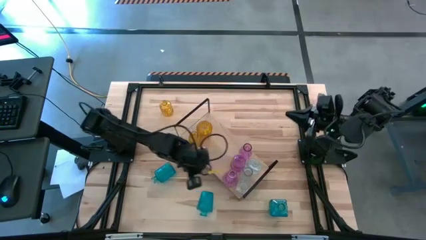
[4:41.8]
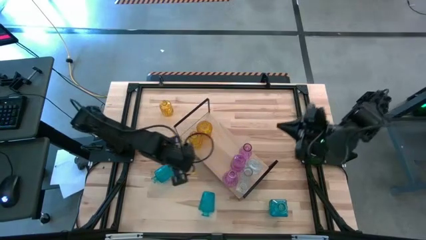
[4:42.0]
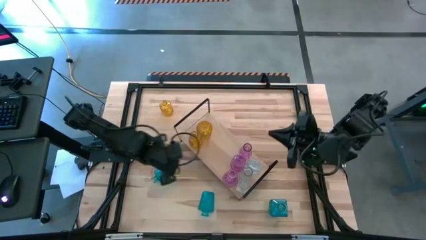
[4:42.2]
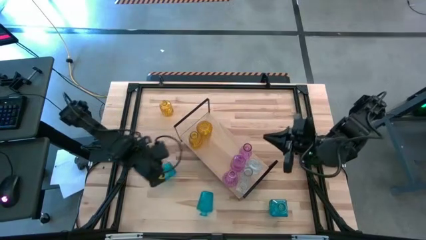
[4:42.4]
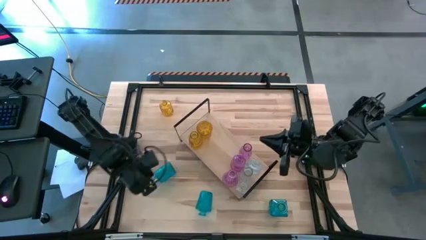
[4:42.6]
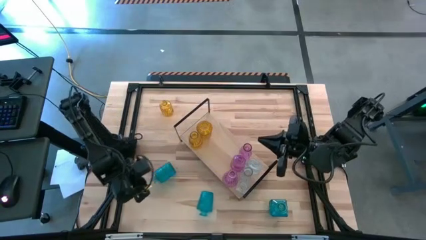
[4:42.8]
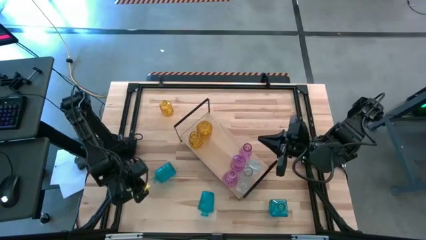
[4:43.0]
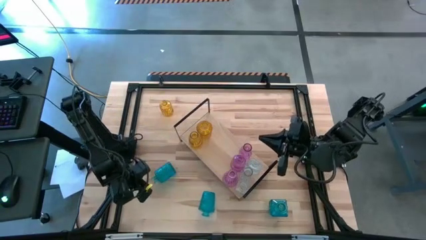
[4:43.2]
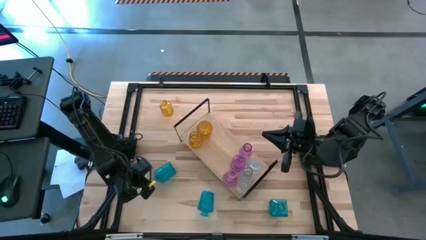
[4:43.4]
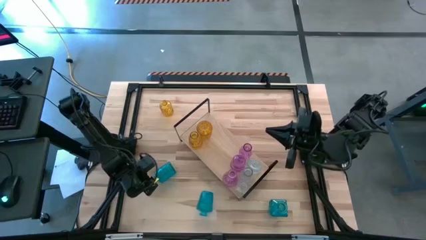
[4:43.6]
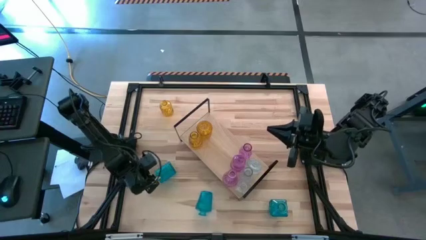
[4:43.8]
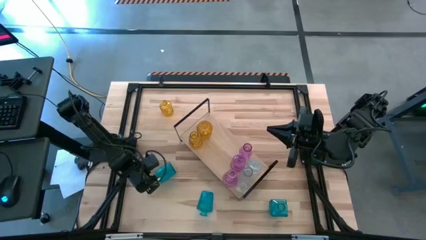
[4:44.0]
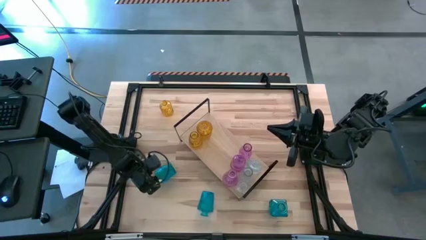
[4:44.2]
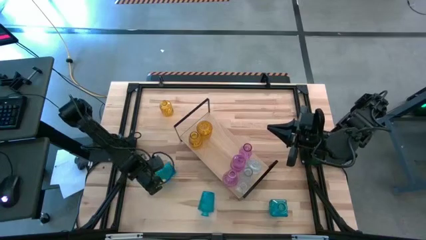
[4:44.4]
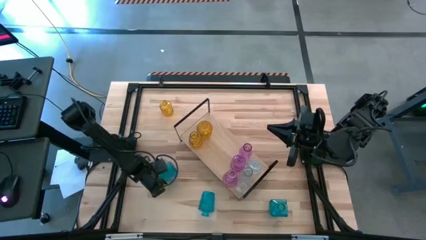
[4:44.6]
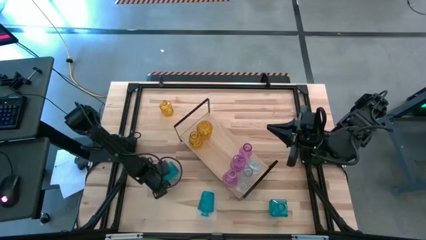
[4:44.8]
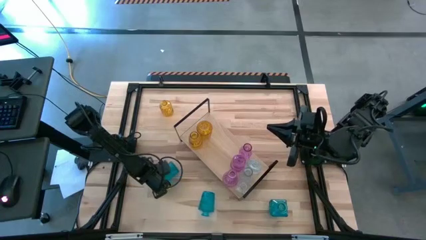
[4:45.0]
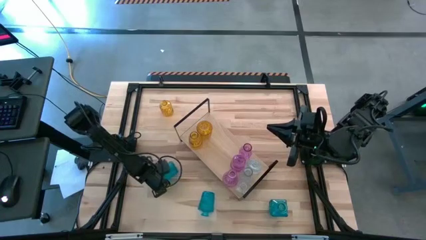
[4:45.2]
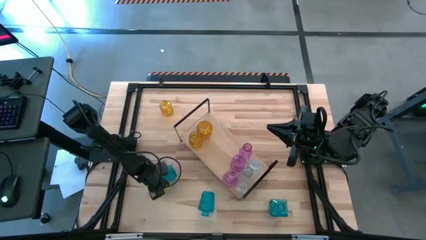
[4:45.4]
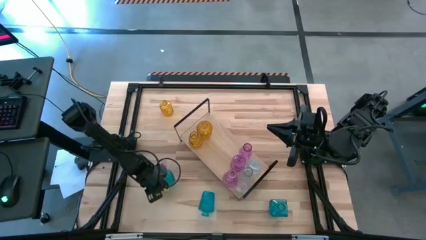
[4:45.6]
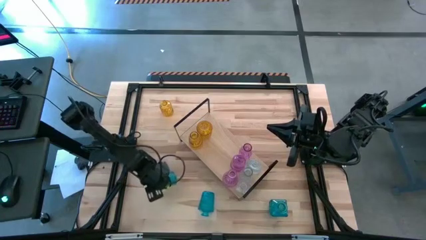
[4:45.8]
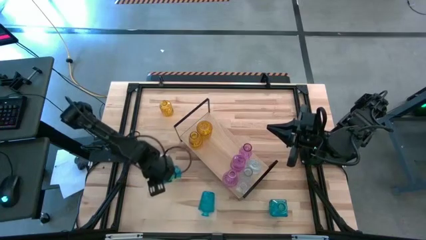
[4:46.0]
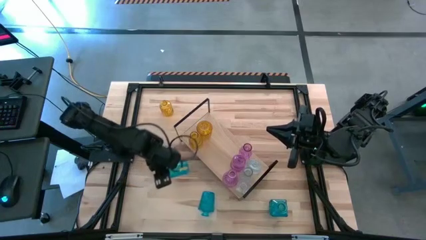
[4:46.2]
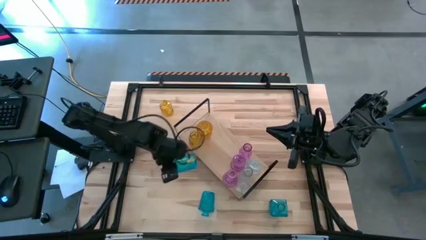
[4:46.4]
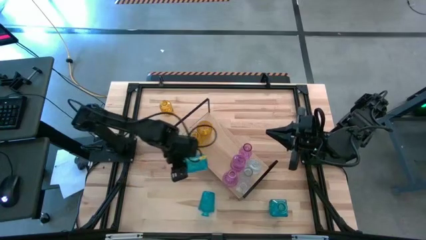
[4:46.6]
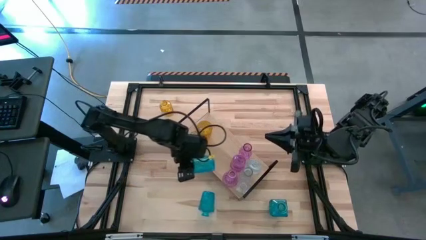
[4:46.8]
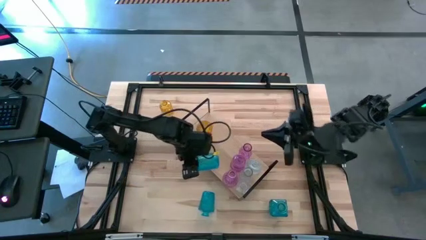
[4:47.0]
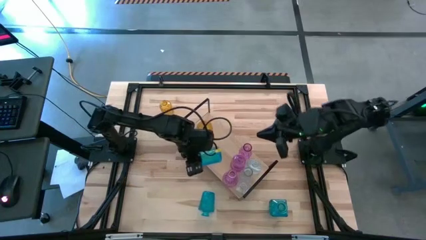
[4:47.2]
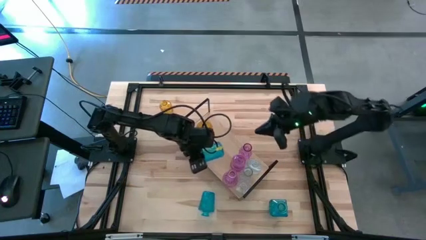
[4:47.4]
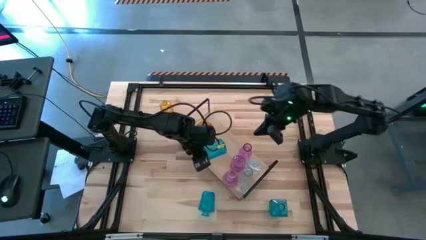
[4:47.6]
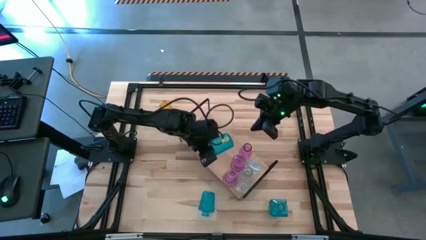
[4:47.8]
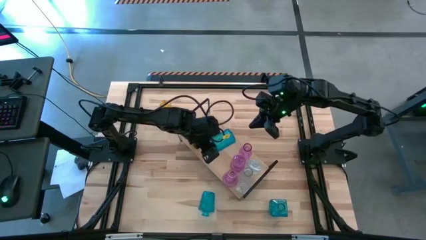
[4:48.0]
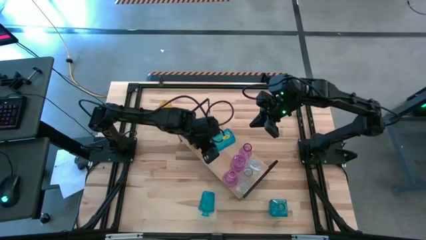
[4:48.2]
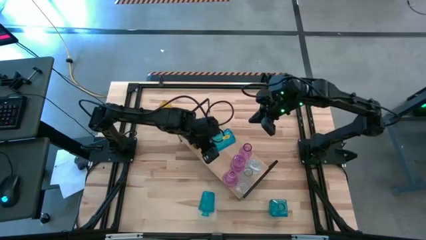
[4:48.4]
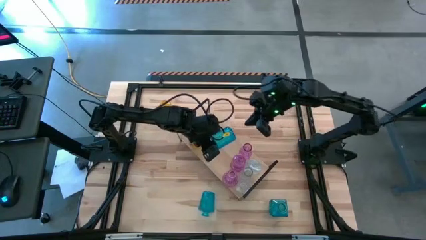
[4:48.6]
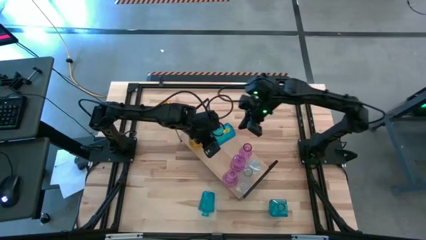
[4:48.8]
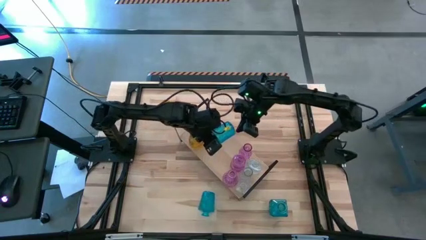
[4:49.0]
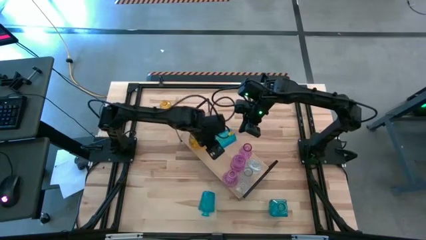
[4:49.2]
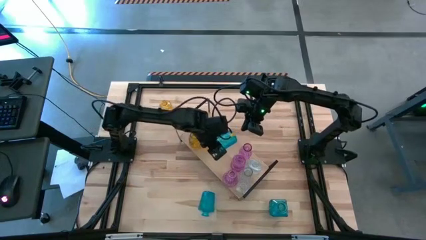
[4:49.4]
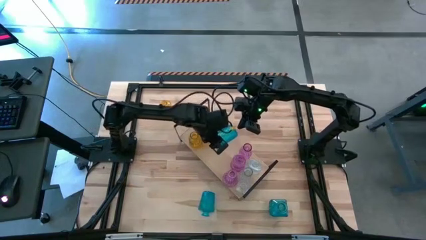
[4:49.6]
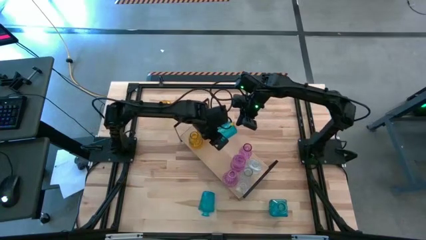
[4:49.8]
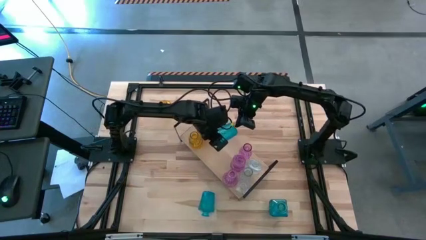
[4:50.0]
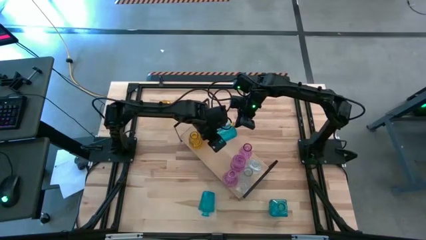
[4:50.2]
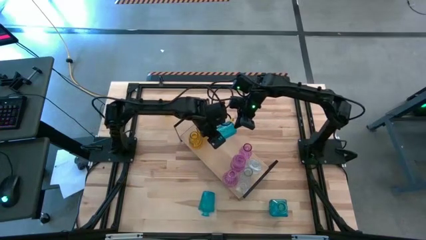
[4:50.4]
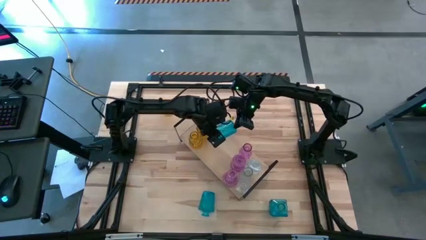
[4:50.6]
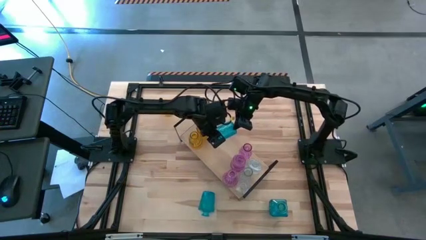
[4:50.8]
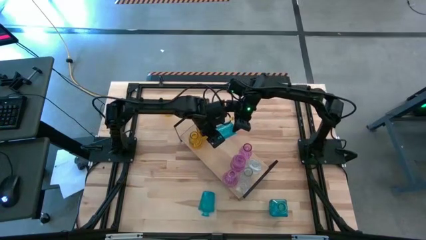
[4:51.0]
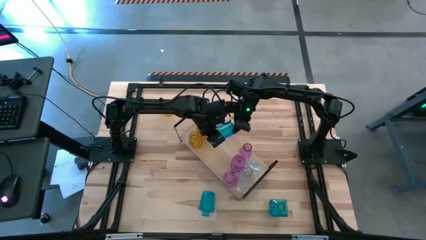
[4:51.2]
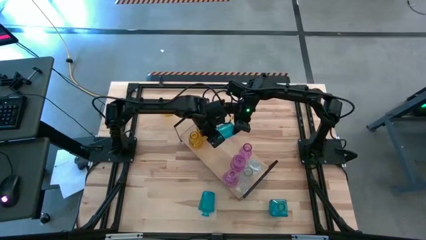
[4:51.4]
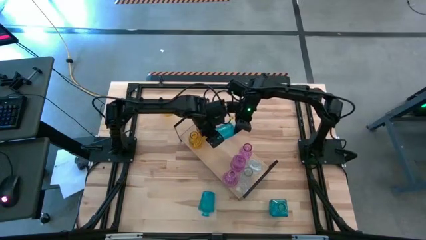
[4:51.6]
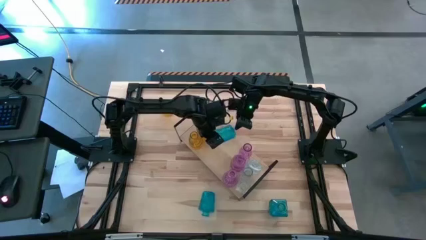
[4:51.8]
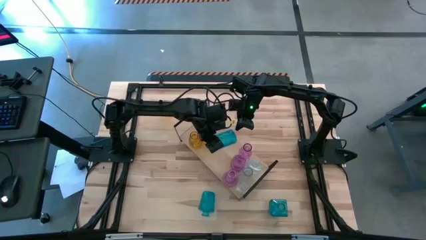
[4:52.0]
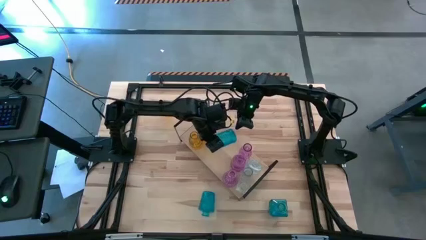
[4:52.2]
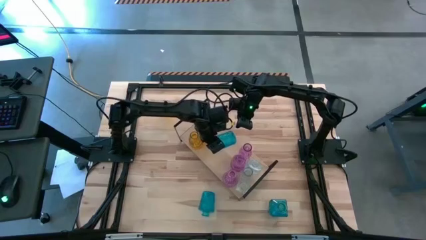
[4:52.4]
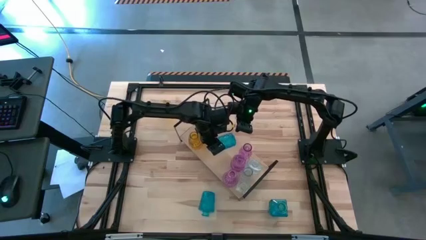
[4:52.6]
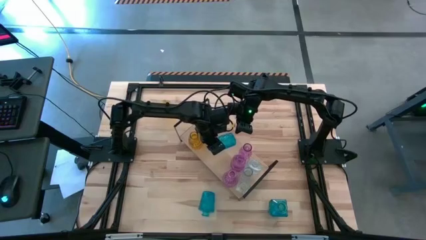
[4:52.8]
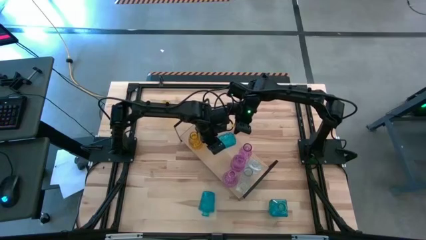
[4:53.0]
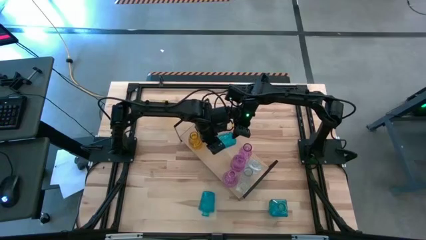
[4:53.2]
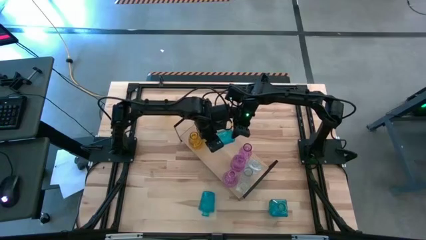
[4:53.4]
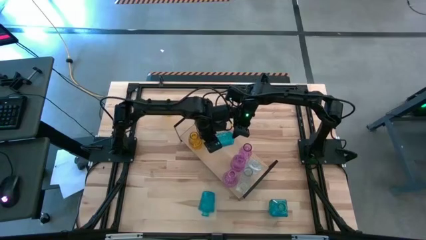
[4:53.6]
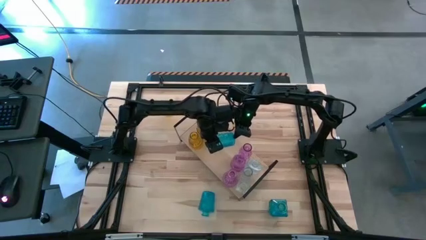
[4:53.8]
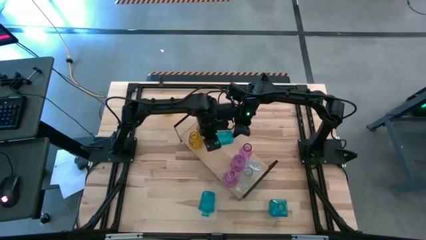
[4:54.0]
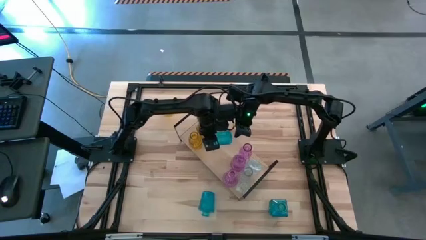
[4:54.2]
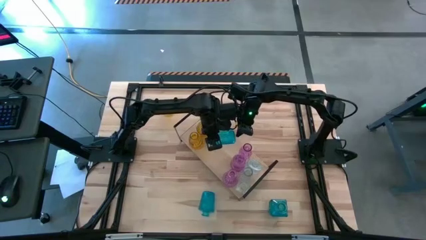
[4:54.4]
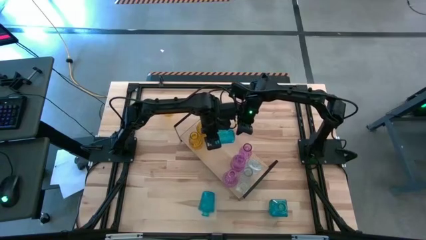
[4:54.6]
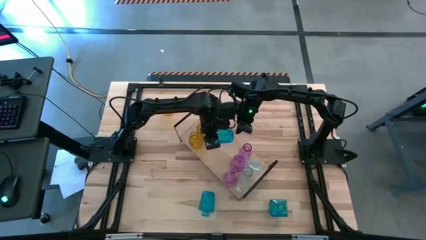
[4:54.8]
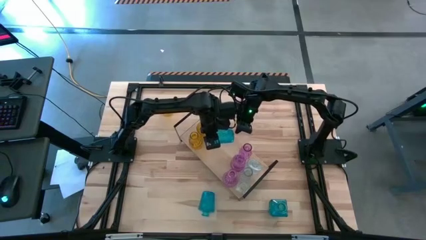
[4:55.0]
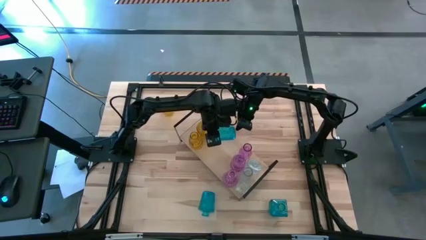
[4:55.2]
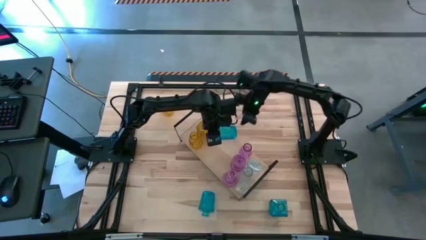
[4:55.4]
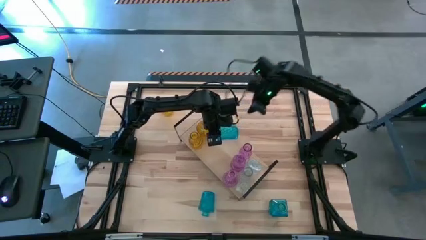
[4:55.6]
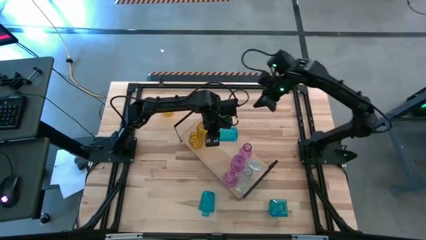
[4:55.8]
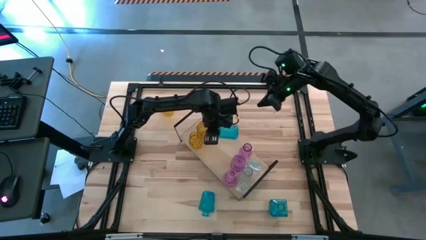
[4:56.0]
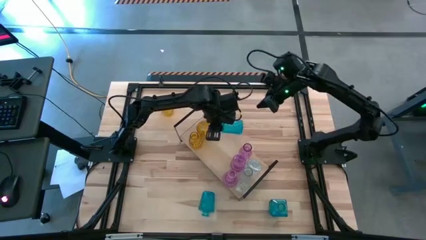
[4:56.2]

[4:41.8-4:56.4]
Task: sort vases onto shelf
Put the left blue crystal vase on the shelf
